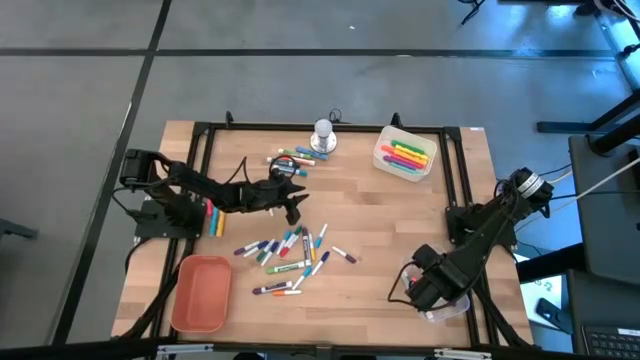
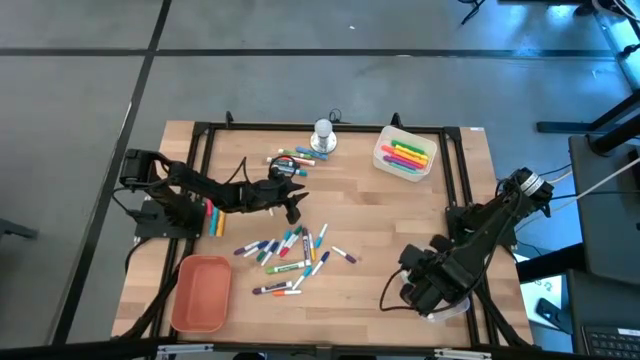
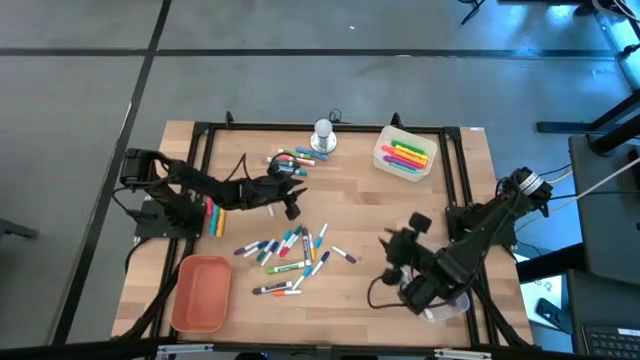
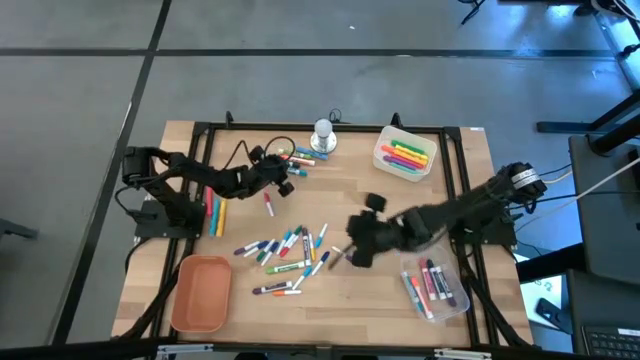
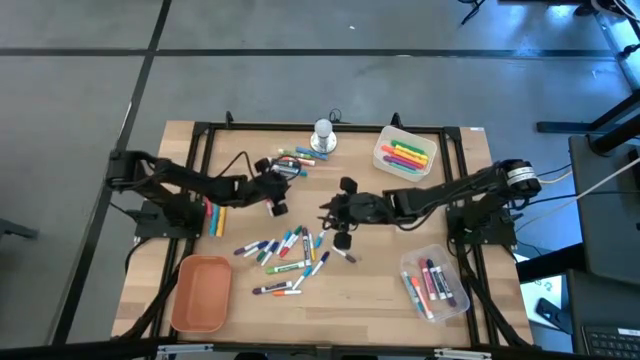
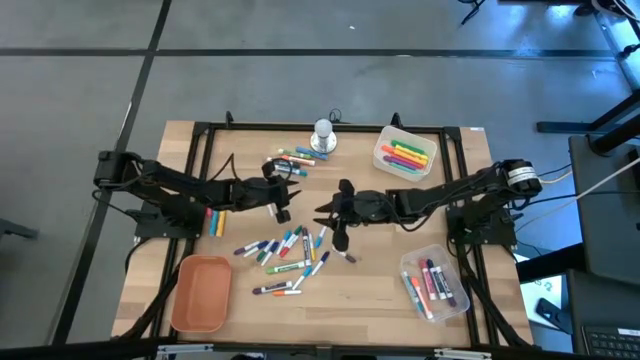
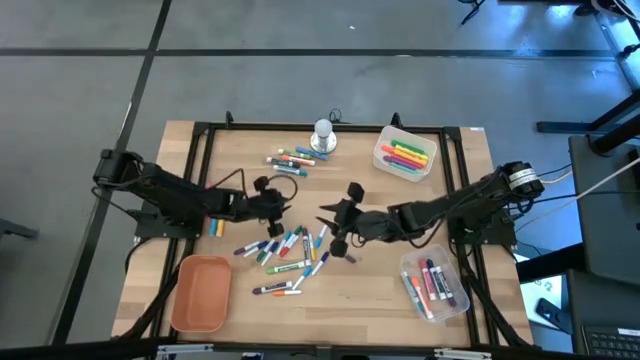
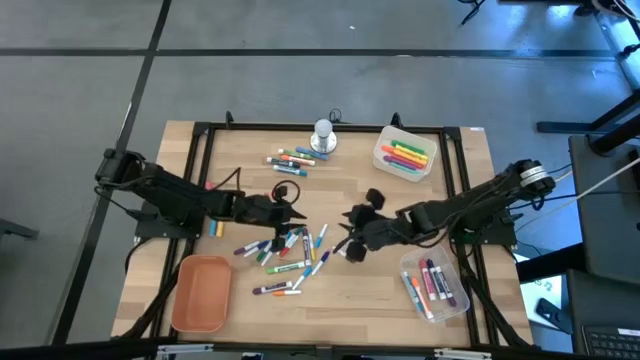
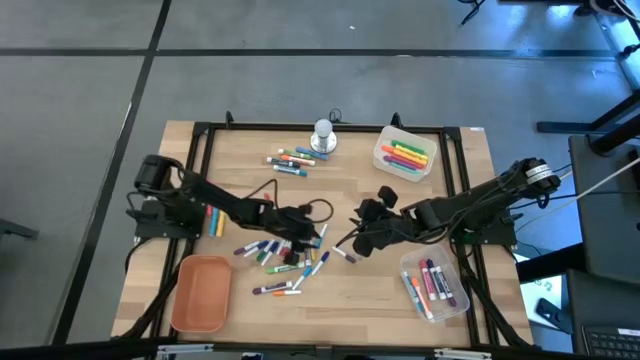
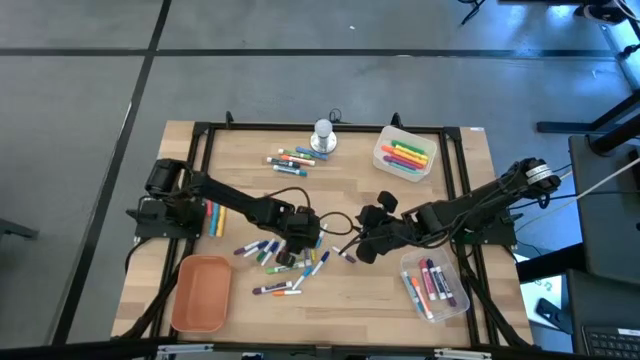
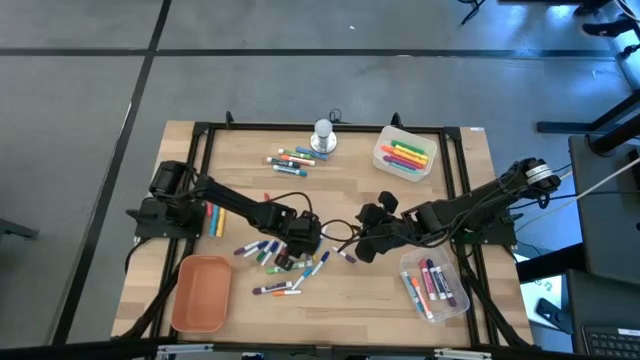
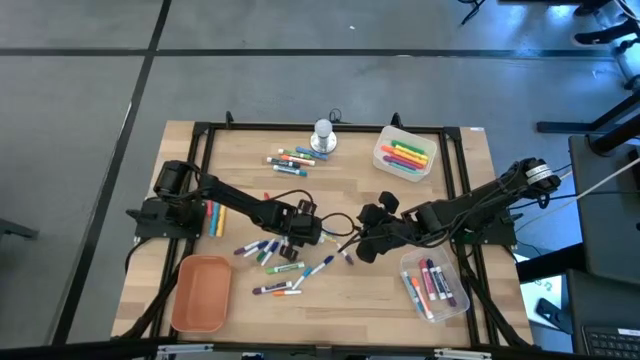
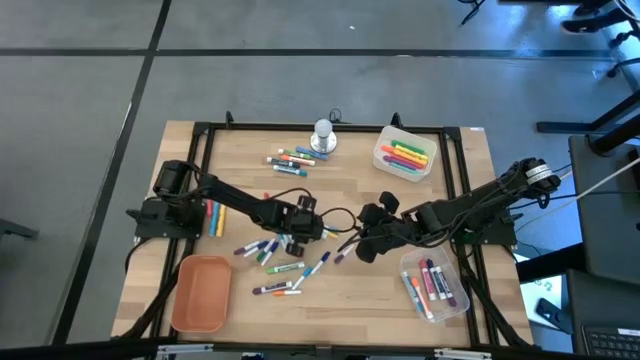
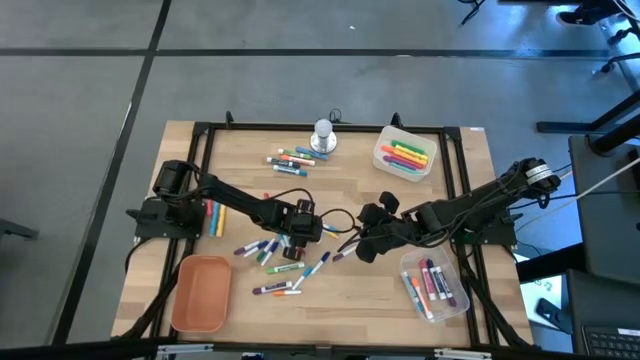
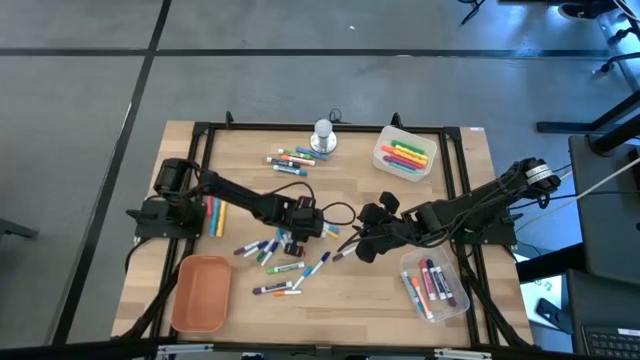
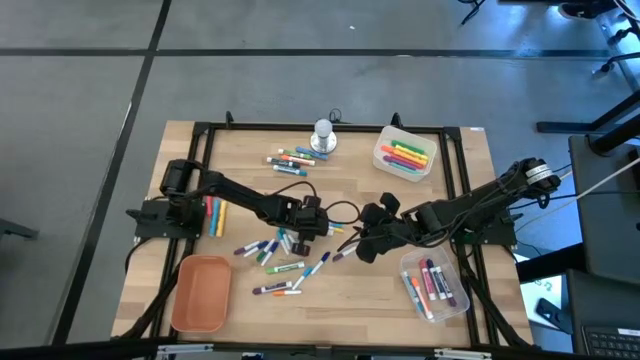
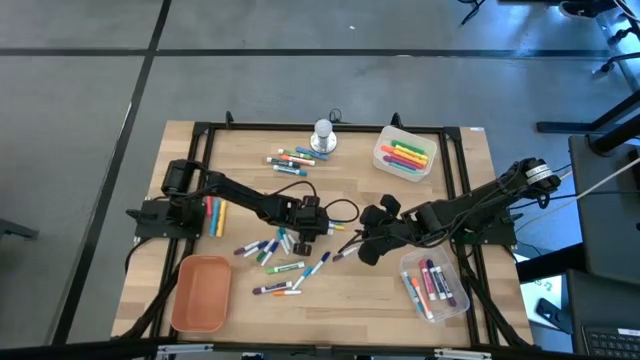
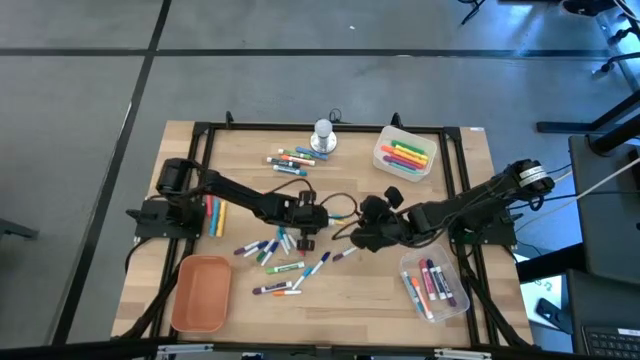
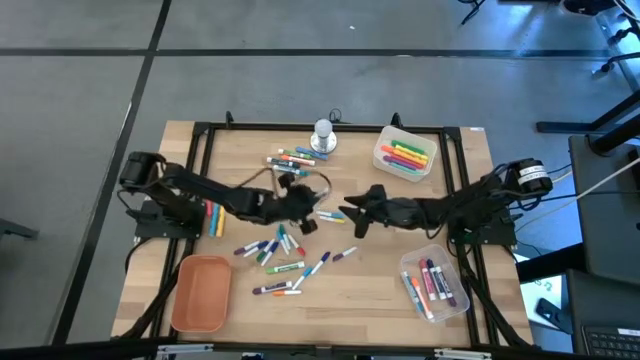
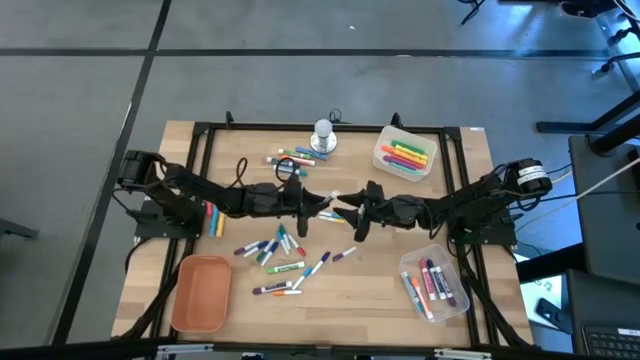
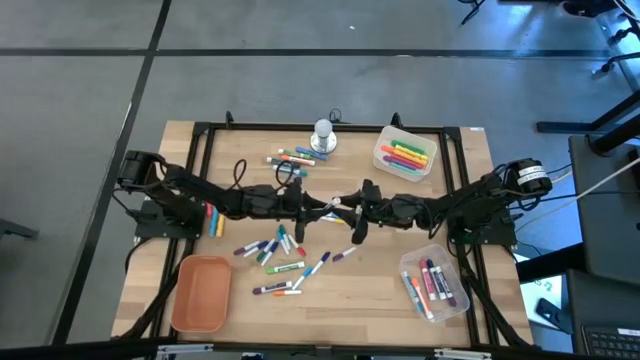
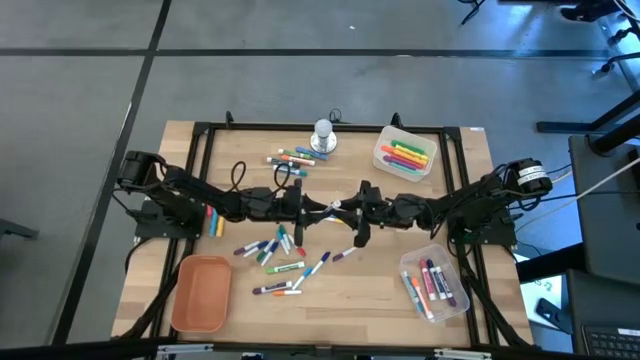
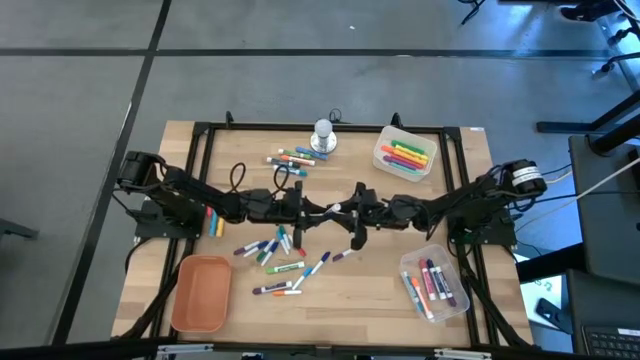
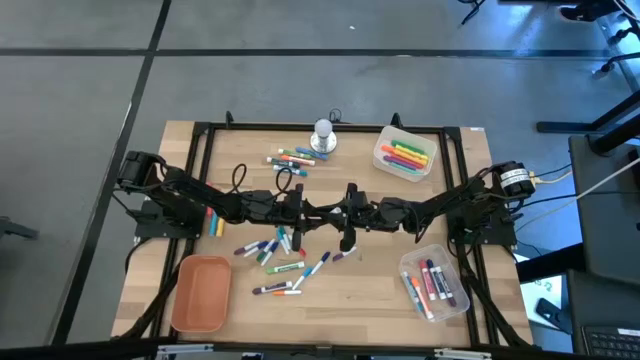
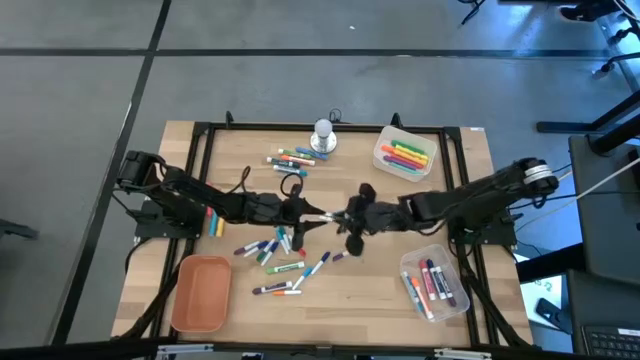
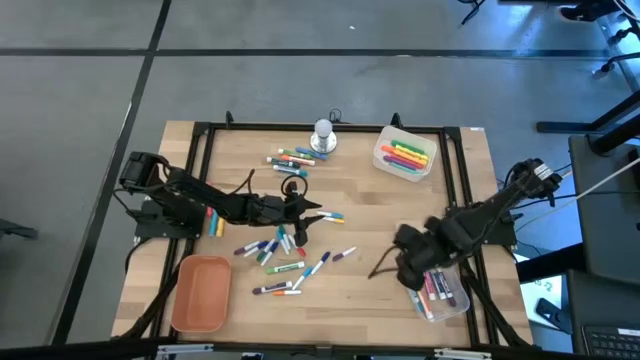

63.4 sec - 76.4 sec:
Task: Pick & Place Markers
Put the medium violet marker pen into the transparent bin

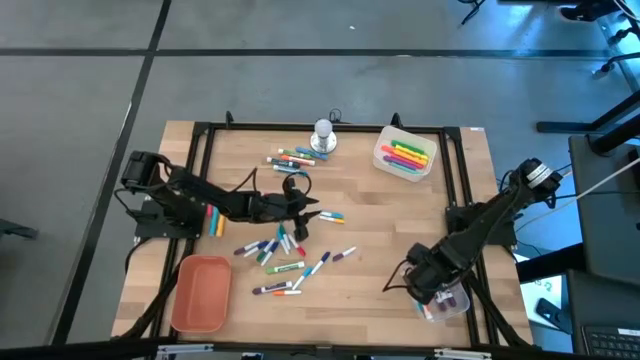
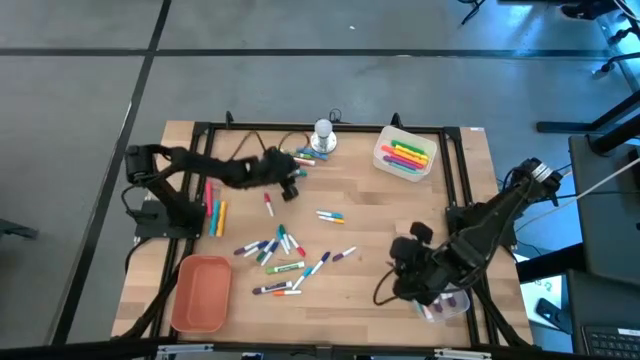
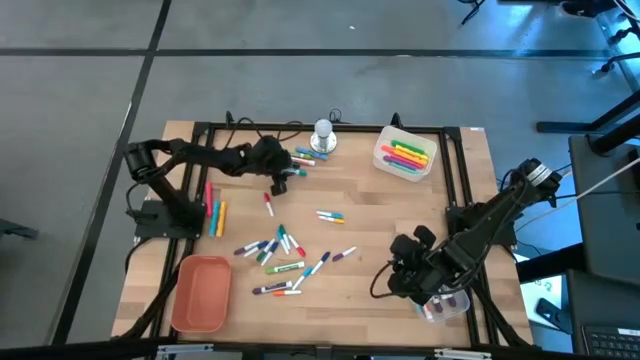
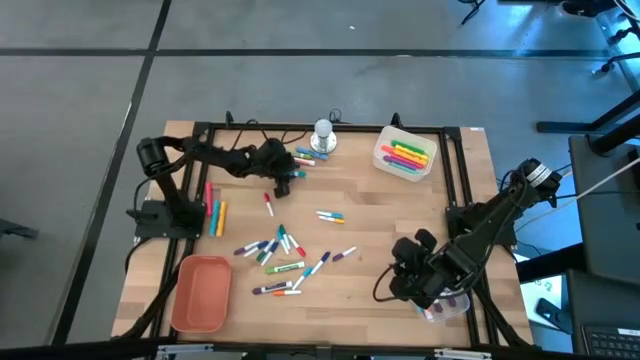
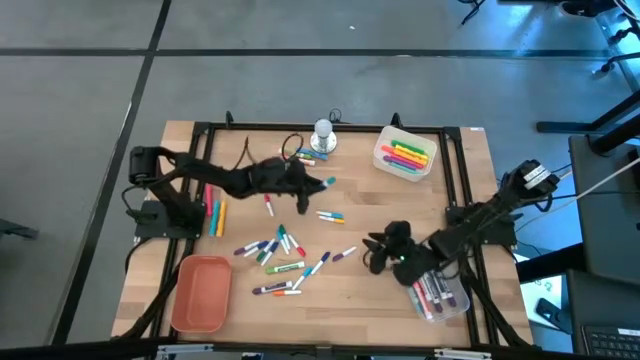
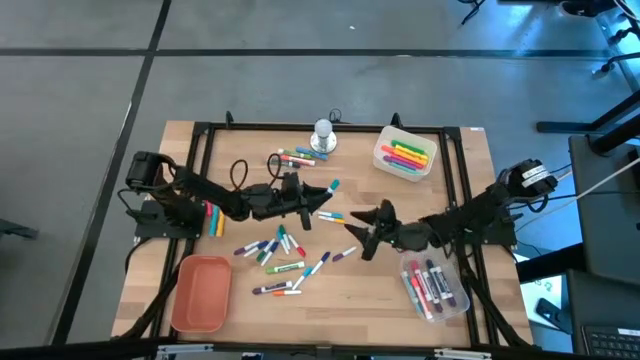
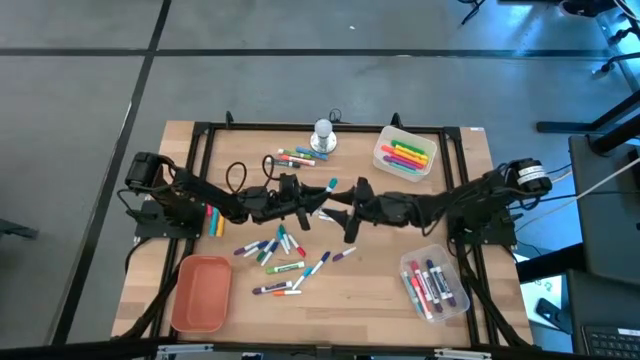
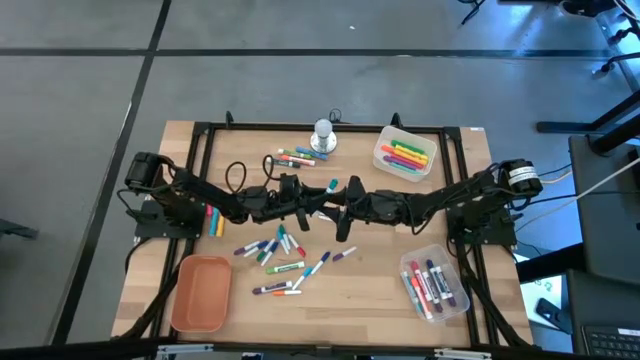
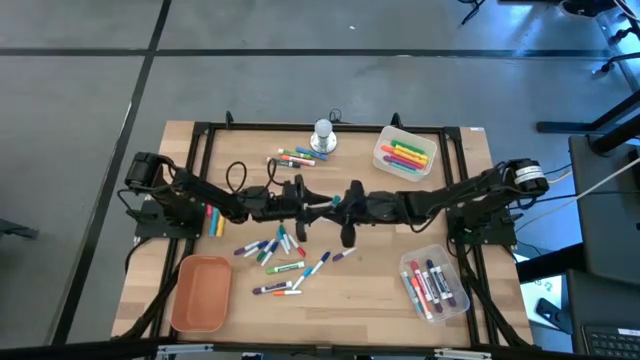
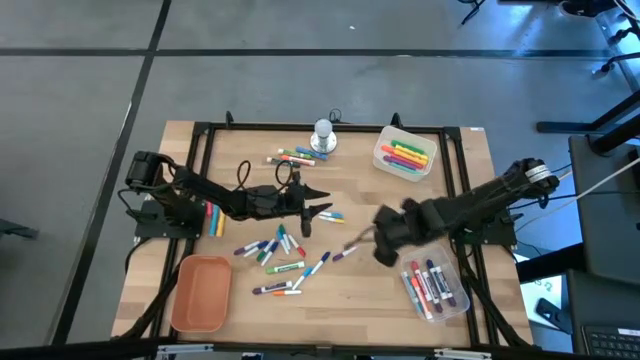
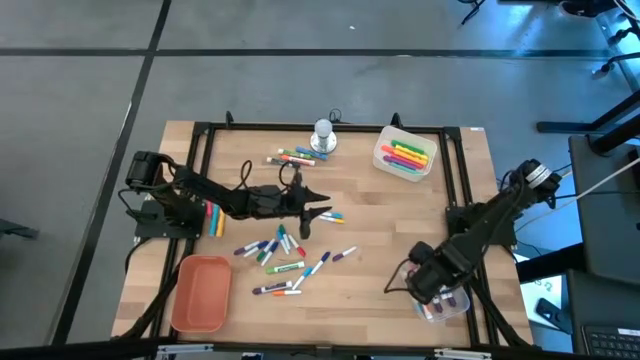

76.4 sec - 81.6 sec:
Put the medium light blue marker pen into the transparent bin

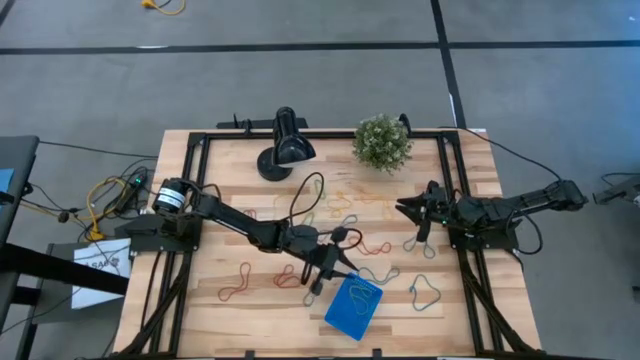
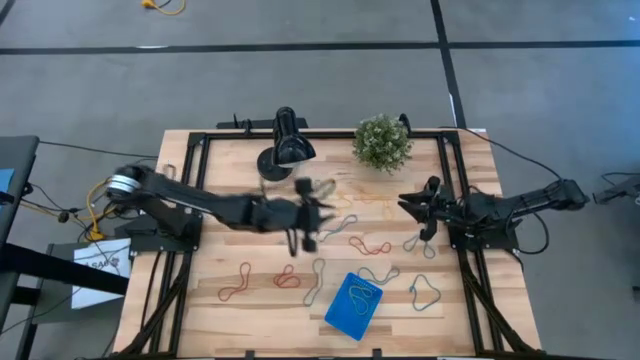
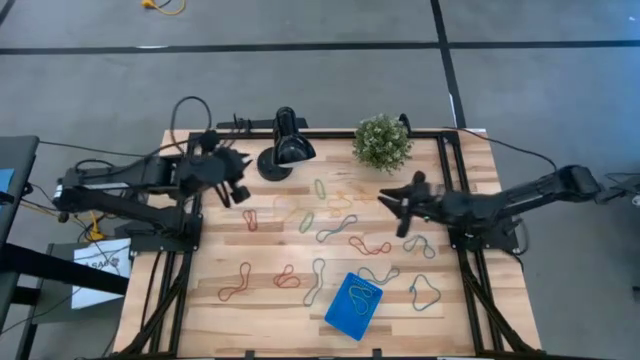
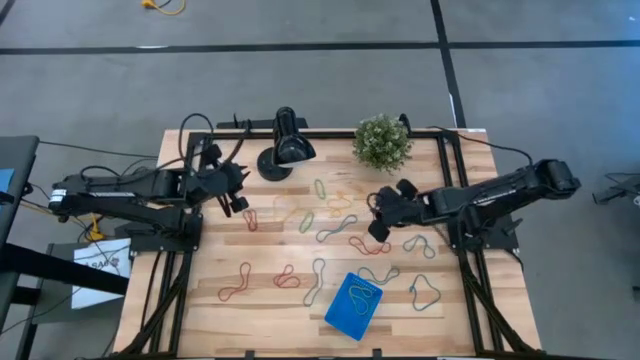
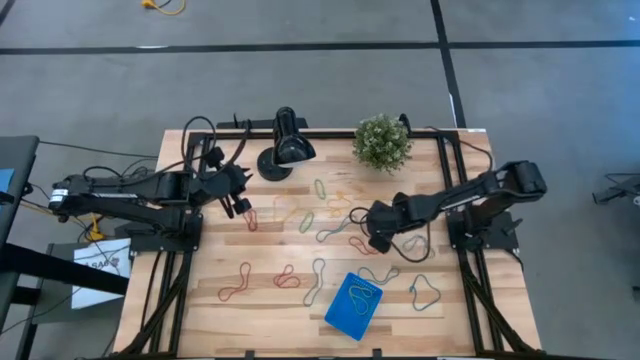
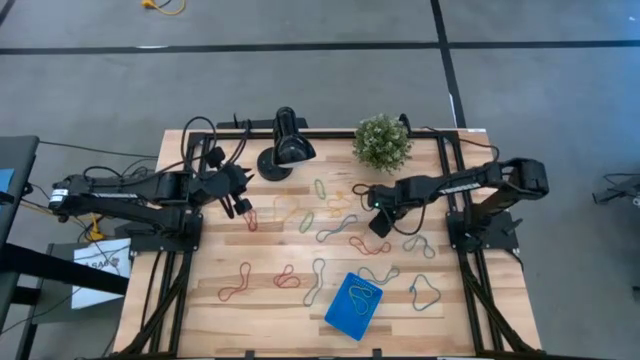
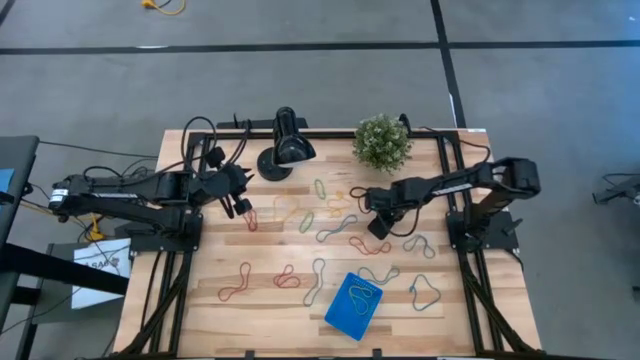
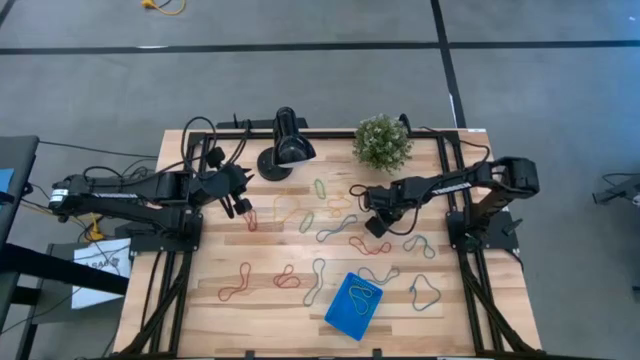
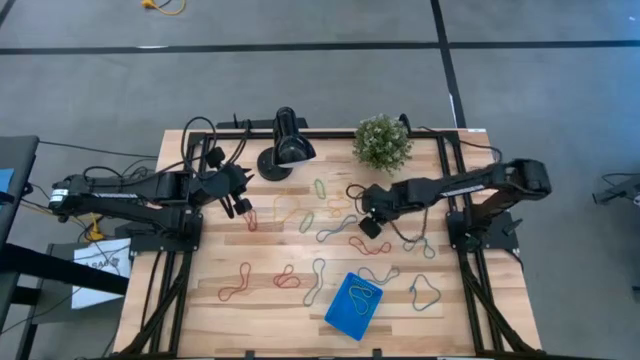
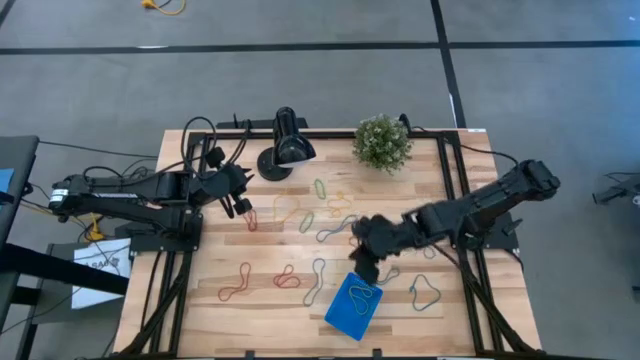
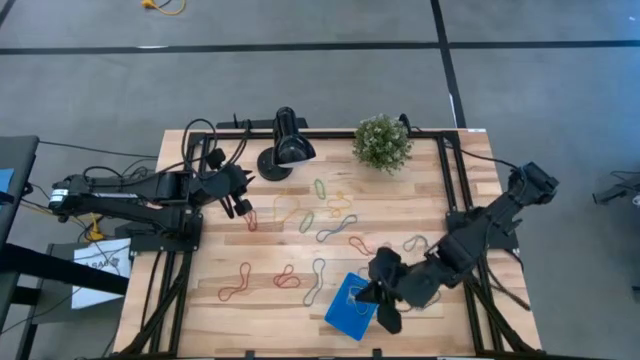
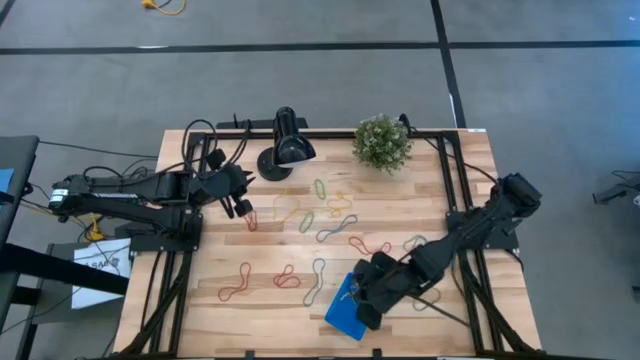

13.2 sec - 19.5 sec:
Task: Pick and place items into bin
Put the yellow rubber band into the blue bin
